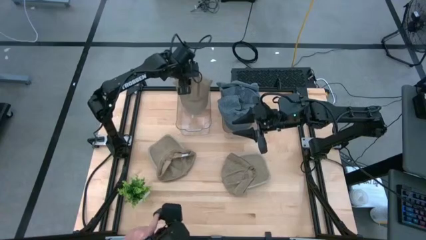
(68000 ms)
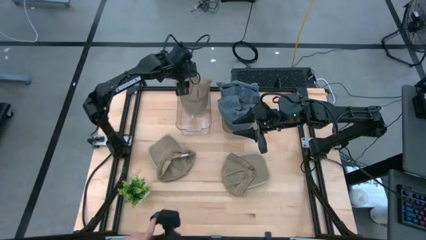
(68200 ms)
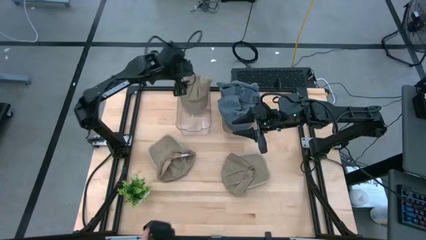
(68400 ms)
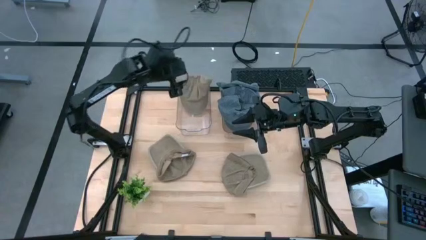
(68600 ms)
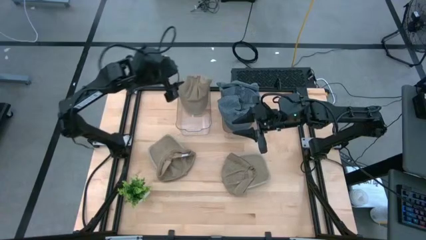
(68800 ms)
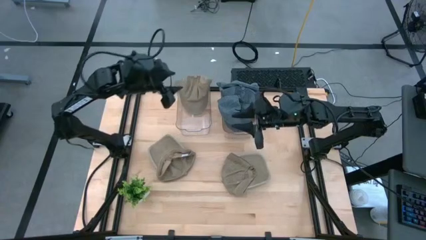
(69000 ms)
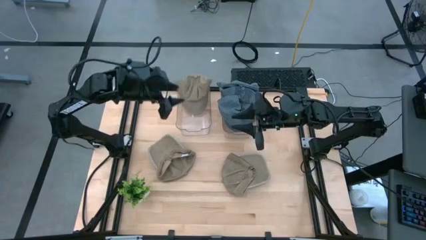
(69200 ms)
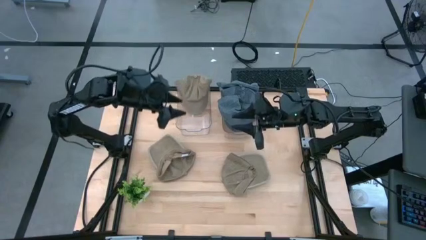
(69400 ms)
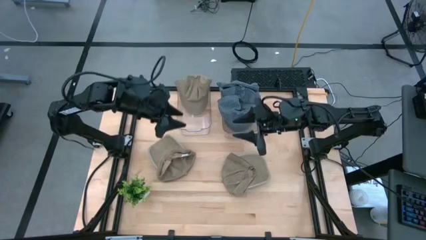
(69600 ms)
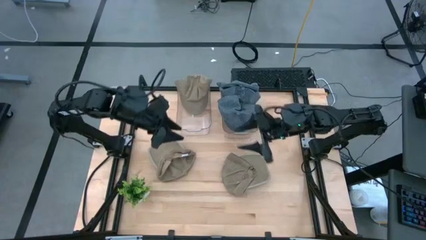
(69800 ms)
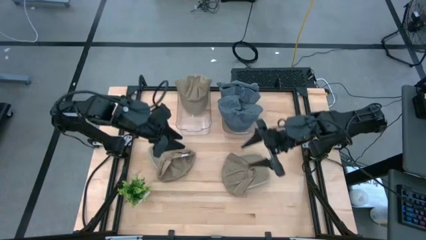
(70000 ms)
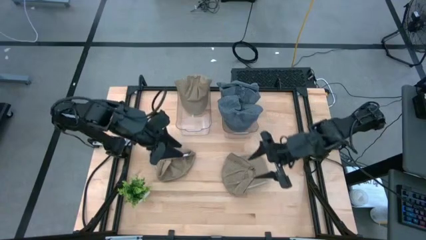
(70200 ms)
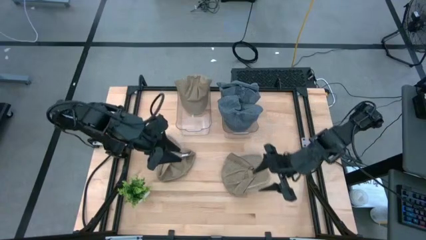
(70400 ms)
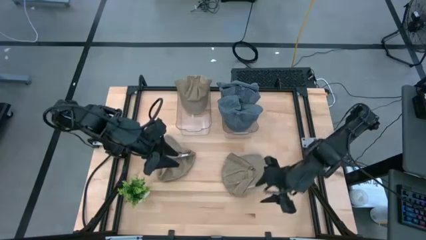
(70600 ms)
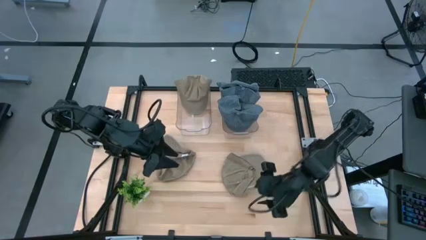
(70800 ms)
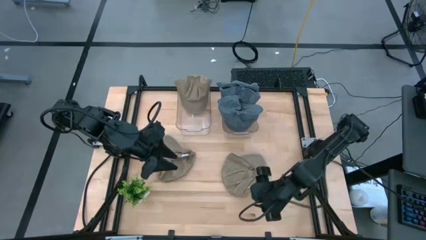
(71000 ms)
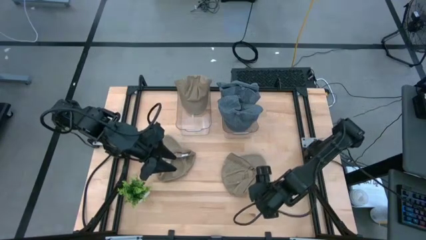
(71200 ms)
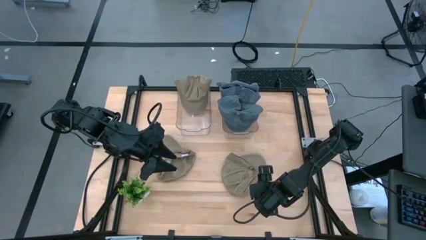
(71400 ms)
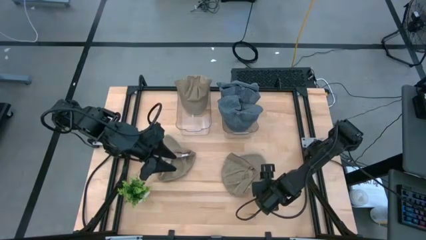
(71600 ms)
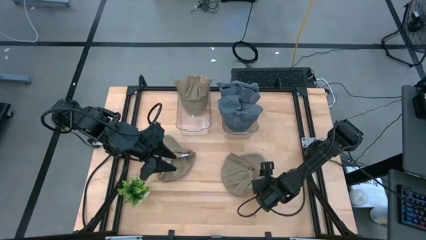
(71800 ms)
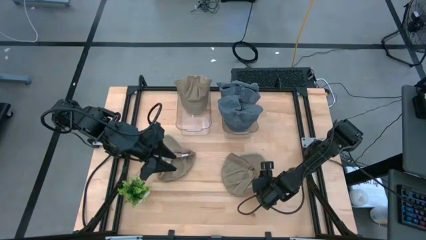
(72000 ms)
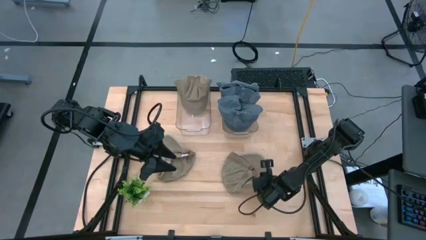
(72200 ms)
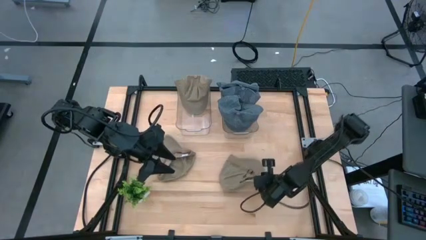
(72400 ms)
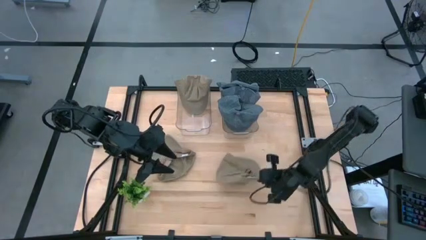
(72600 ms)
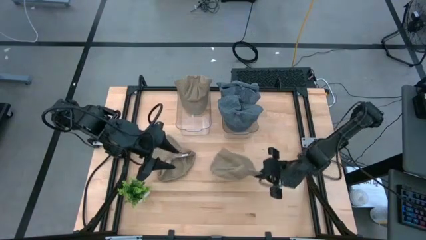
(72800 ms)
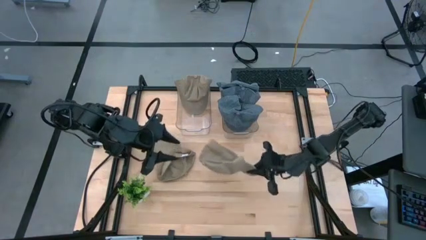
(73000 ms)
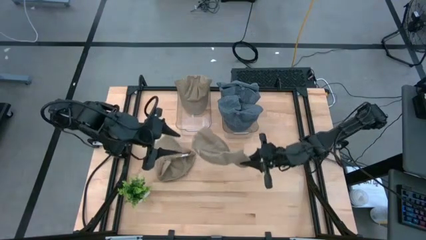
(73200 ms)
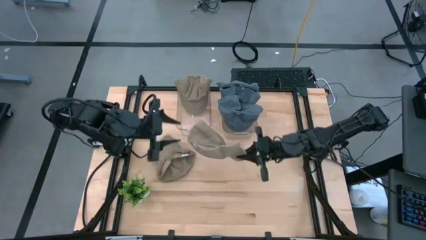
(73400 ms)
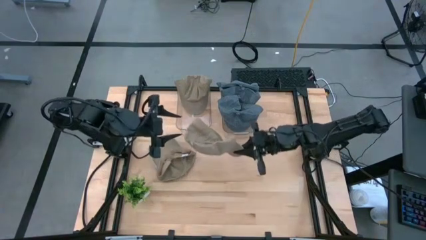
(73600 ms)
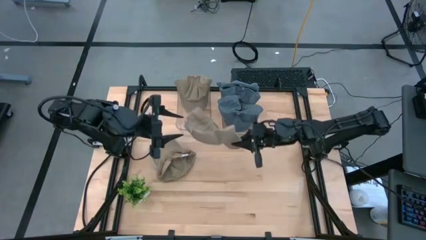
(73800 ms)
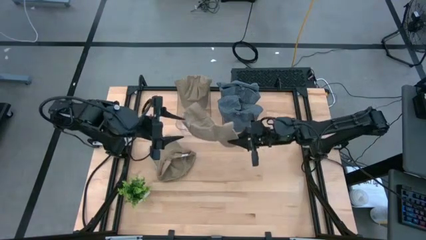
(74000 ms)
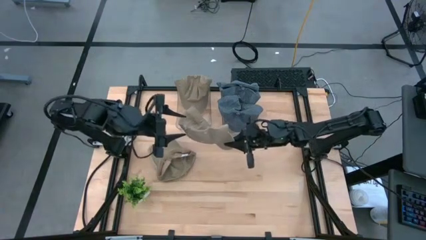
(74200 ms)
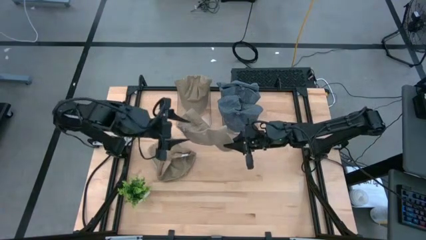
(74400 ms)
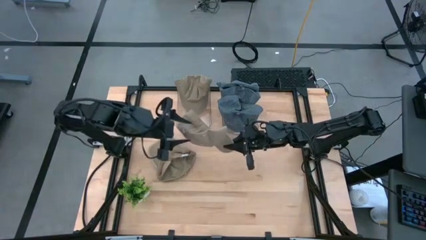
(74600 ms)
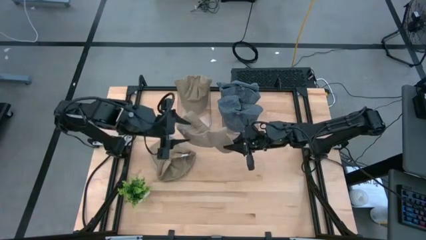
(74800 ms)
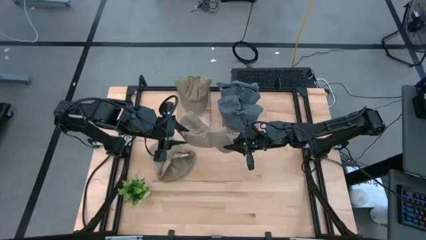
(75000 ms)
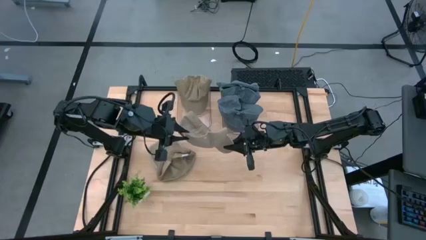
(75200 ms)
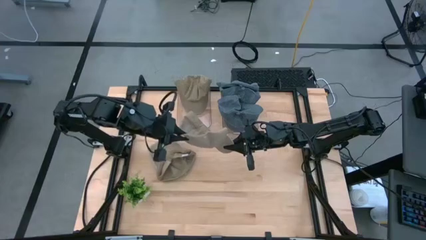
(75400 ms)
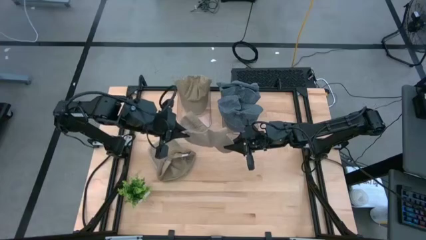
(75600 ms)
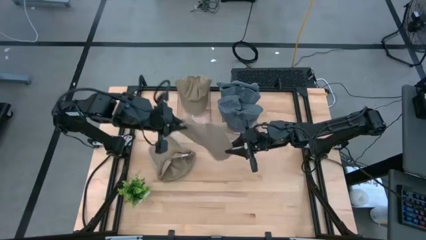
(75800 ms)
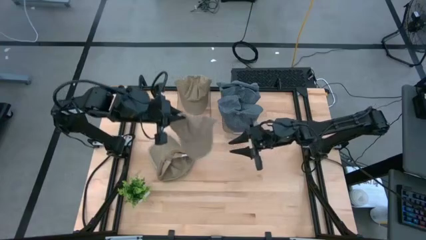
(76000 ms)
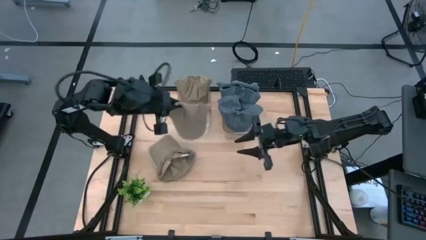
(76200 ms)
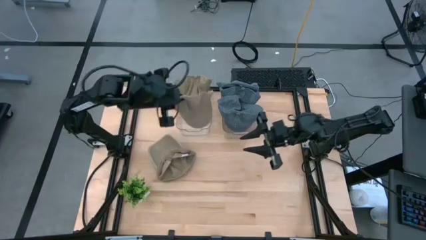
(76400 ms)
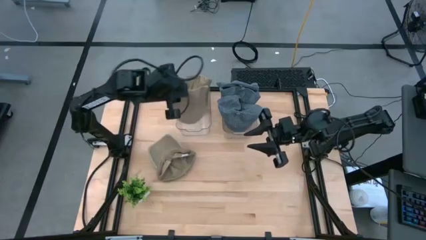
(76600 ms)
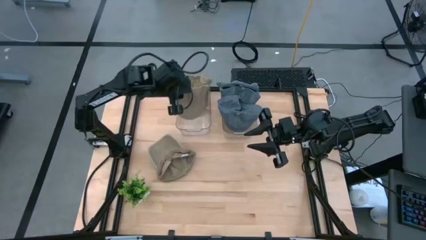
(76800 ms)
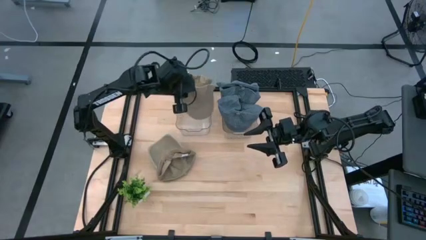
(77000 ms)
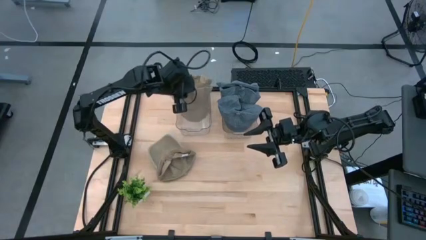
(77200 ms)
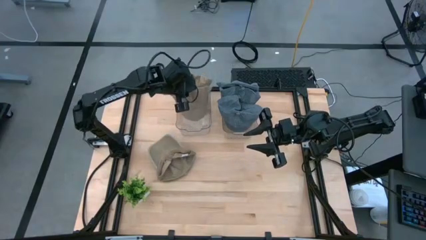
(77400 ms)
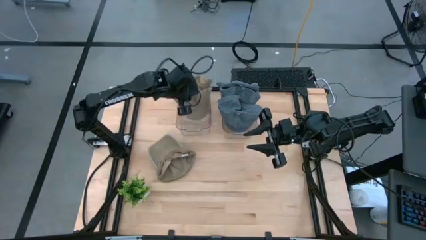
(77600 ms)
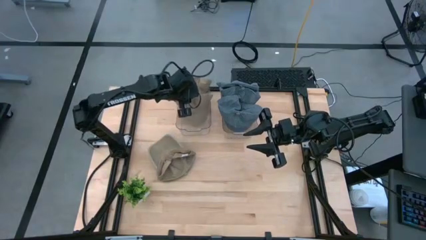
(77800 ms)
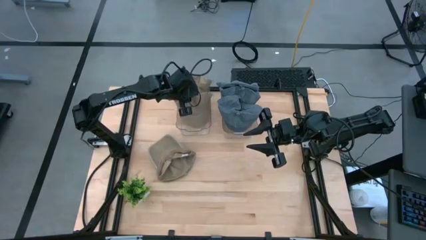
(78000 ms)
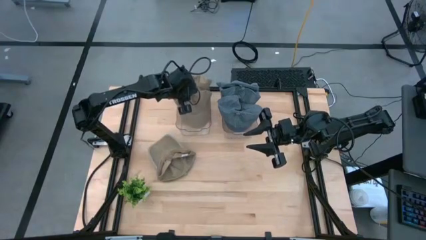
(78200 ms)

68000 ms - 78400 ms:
Task: Pick & Place hat
Put the right brown cap into the left transparent bin

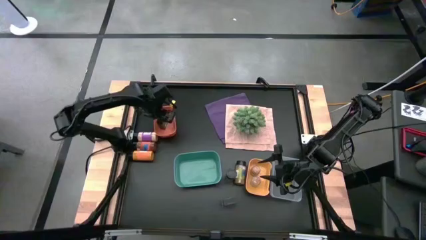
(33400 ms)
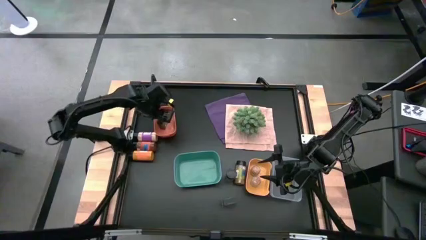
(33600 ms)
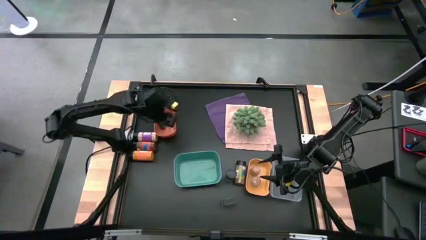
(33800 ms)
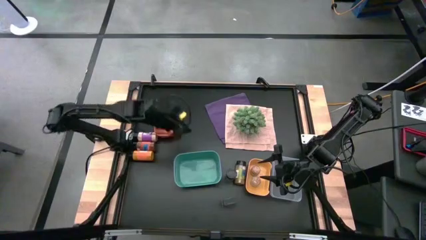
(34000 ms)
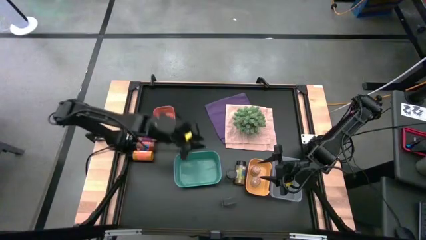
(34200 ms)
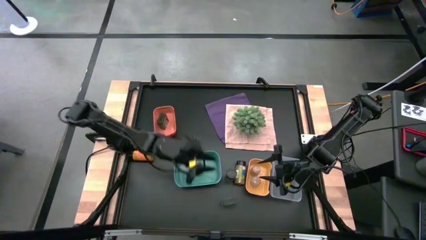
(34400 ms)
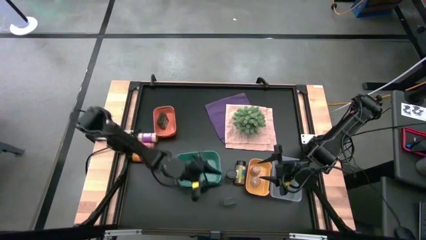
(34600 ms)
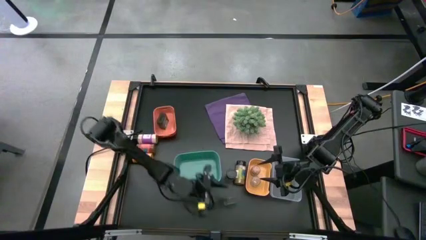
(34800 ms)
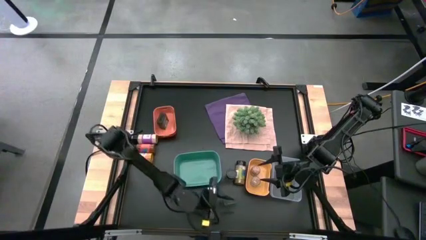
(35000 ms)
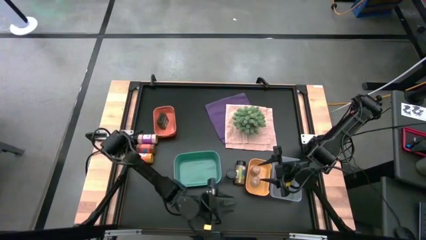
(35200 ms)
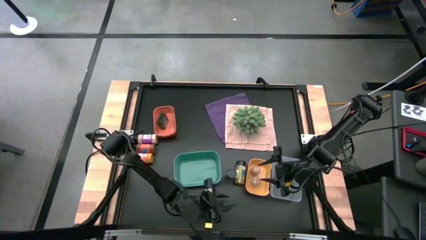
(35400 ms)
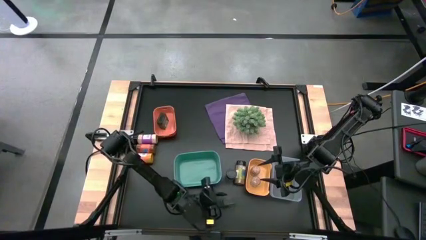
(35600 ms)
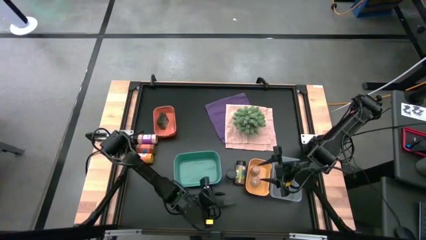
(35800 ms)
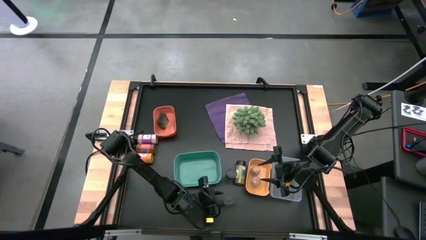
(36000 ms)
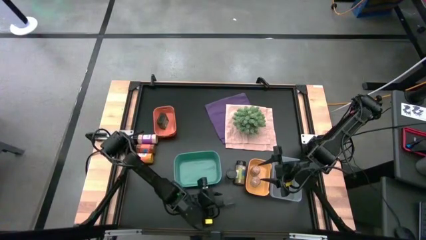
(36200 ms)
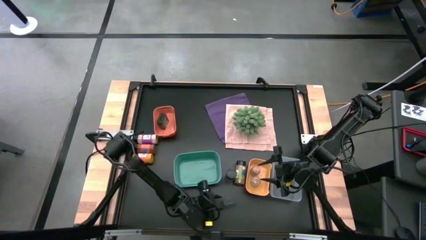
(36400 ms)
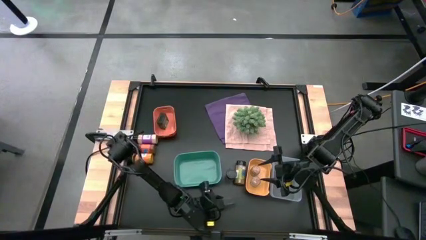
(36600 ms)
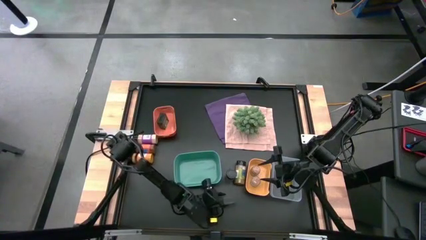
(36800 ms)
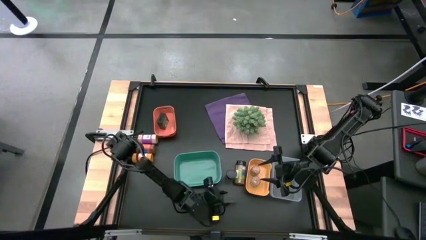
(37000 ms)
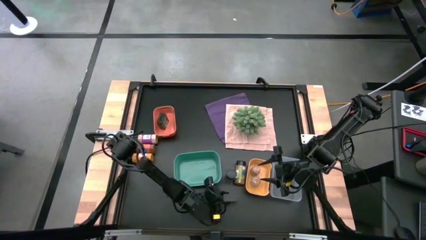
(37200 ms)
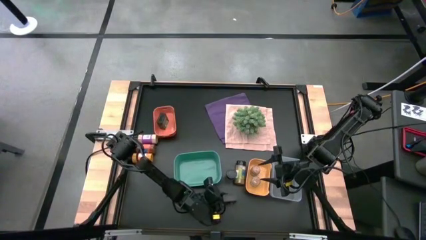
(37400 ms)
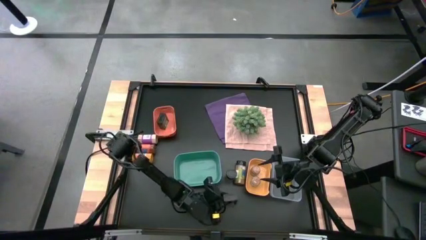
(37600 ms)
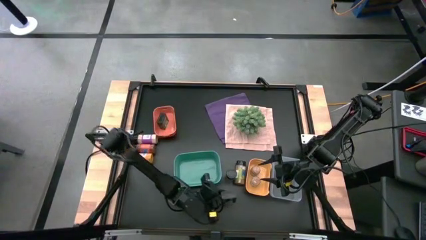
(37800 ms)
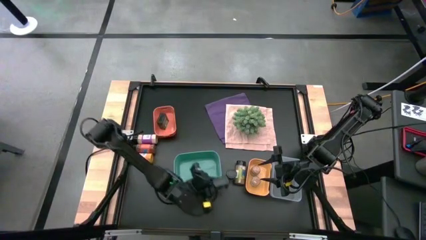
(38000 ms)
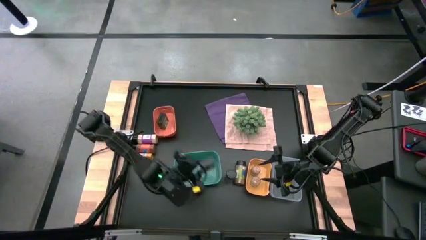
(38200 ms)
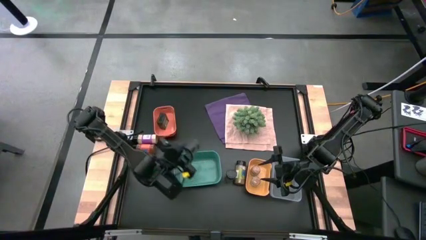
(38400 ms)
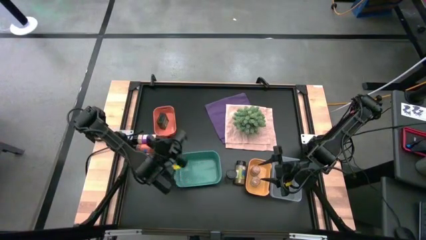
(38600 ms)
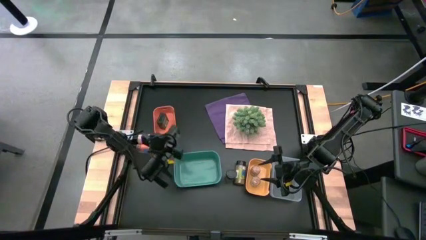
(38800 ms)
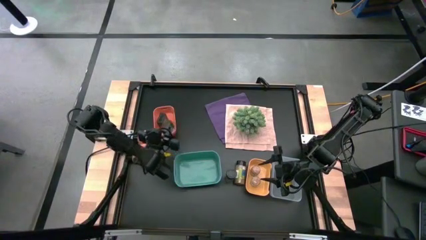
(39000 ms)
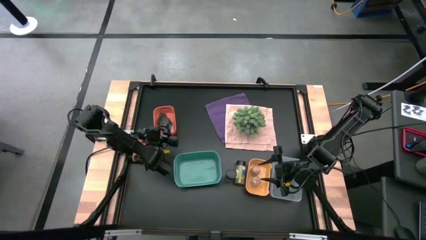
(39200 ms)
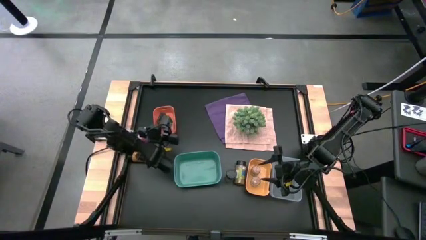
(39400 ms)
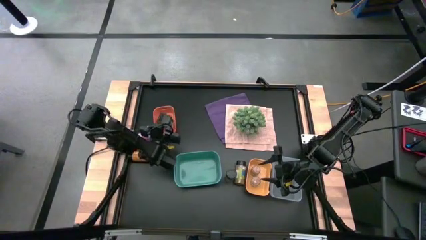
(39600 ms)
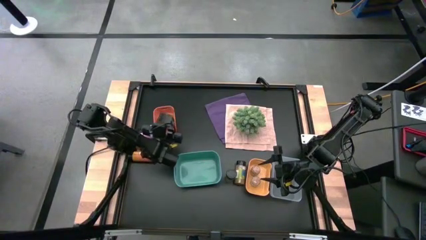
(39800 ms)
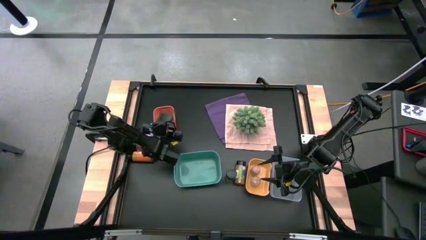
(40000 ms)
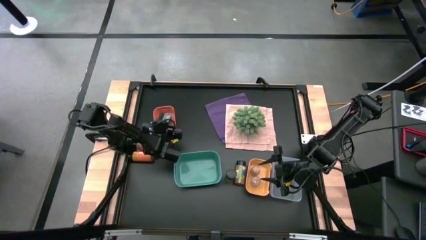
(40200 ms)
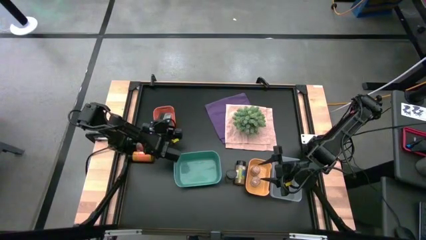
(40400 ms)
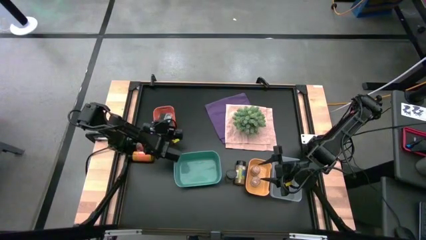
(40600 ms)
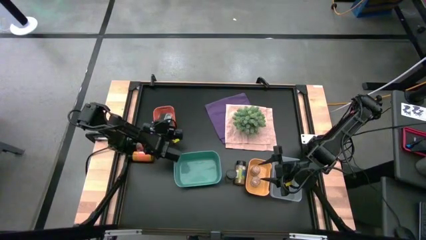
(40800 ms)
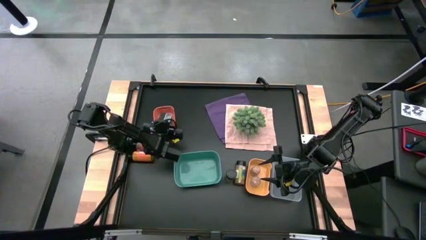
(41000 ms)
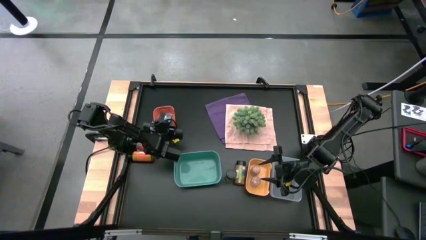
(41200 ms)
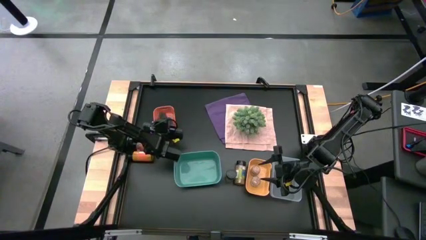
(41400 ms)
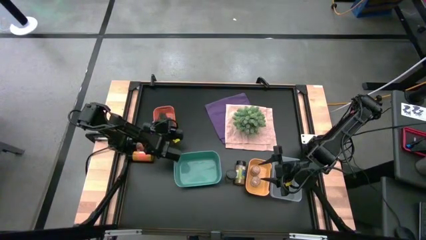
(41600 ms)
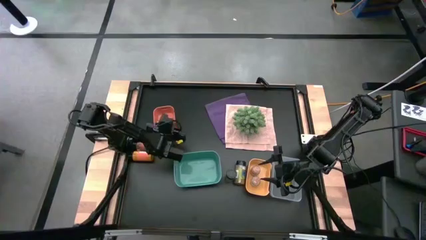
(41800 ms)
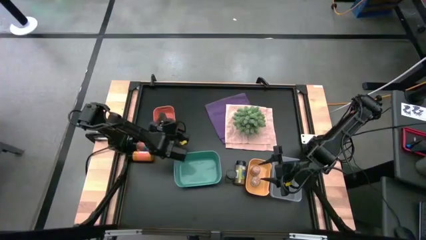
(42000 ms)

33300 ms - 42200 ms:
Task: Sort spices by type
Put the green seasoning can into the orange bin
